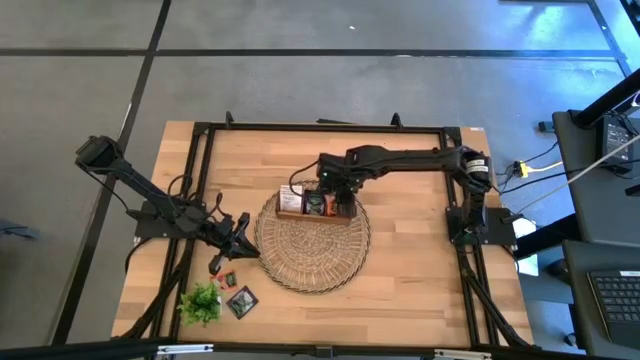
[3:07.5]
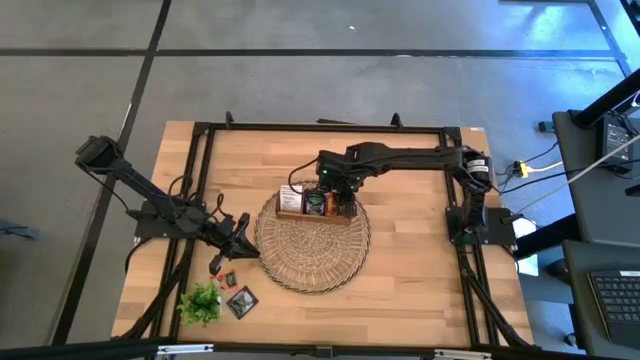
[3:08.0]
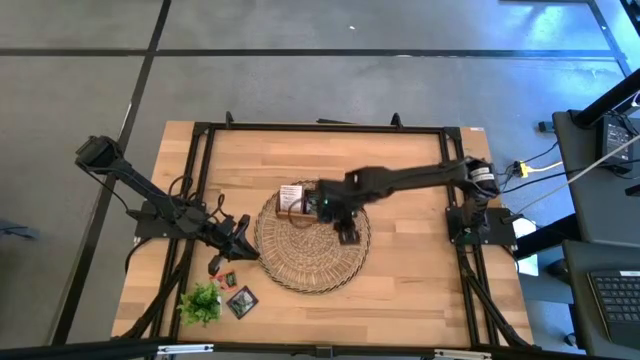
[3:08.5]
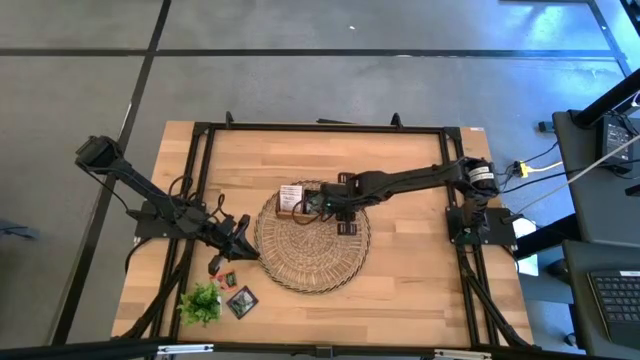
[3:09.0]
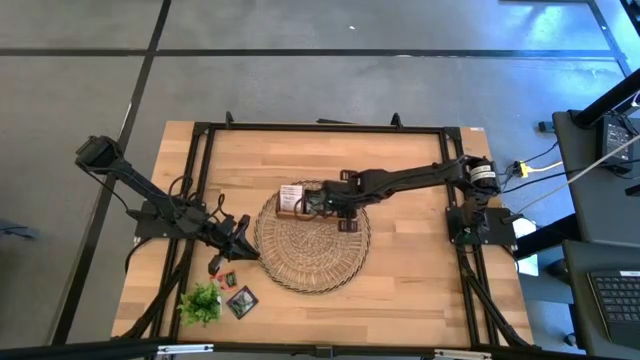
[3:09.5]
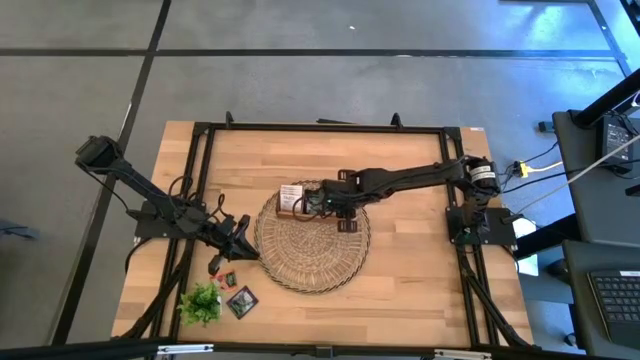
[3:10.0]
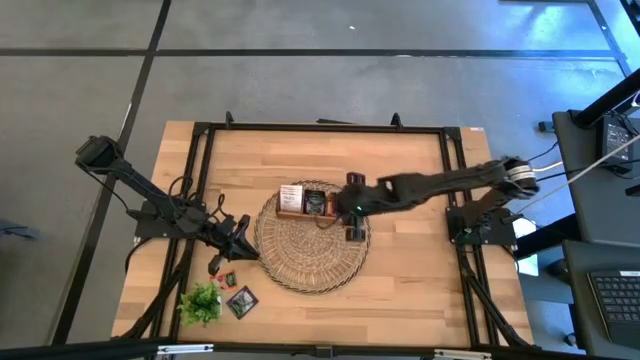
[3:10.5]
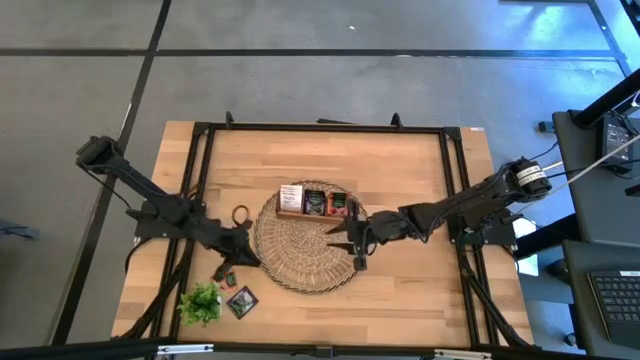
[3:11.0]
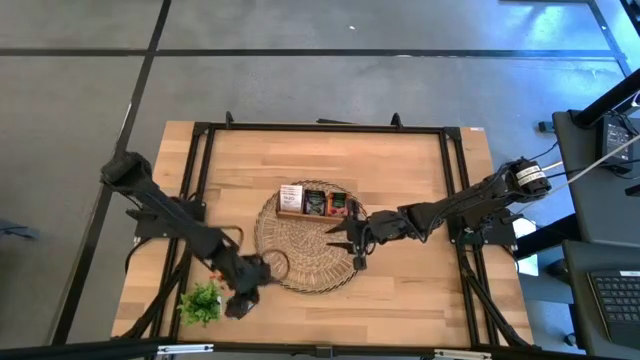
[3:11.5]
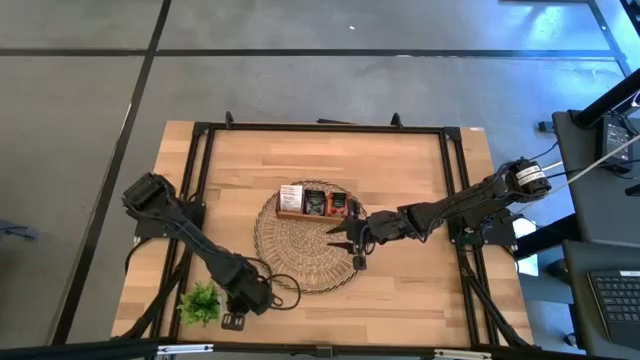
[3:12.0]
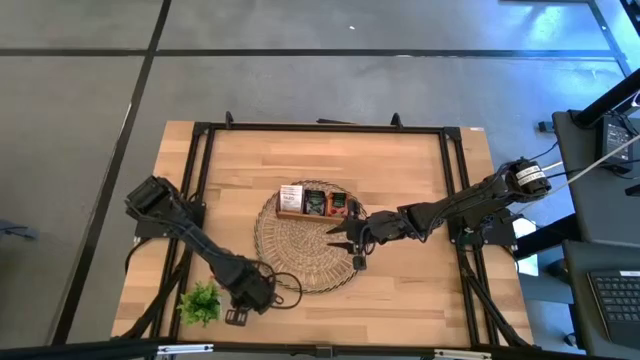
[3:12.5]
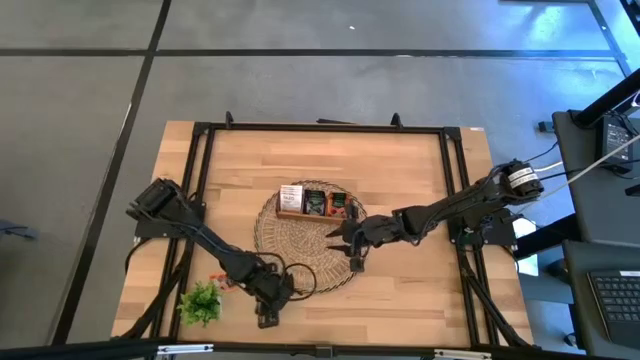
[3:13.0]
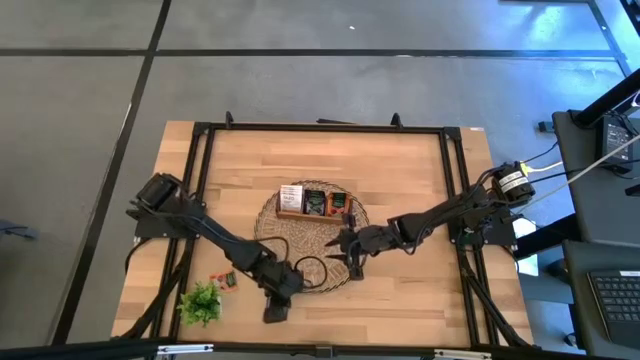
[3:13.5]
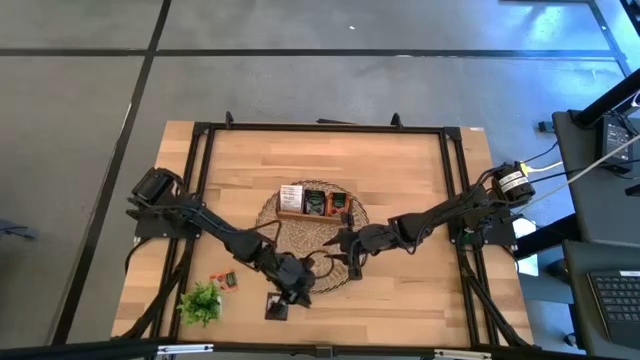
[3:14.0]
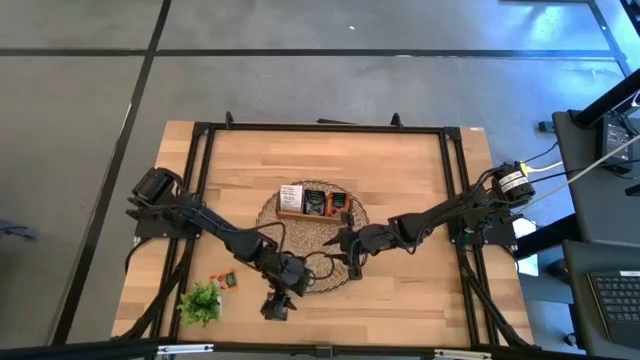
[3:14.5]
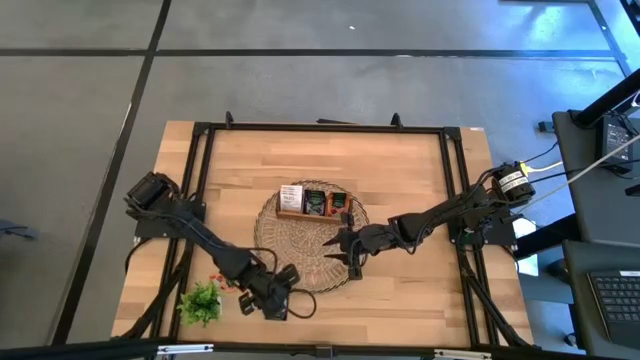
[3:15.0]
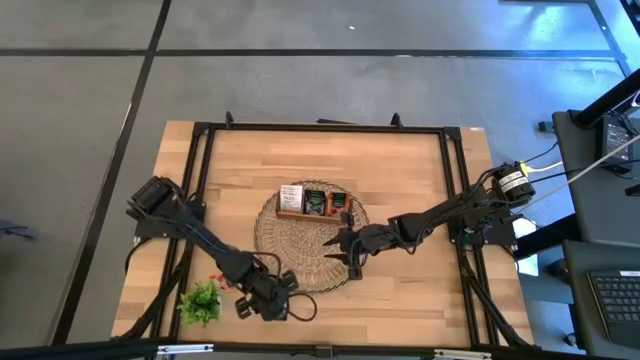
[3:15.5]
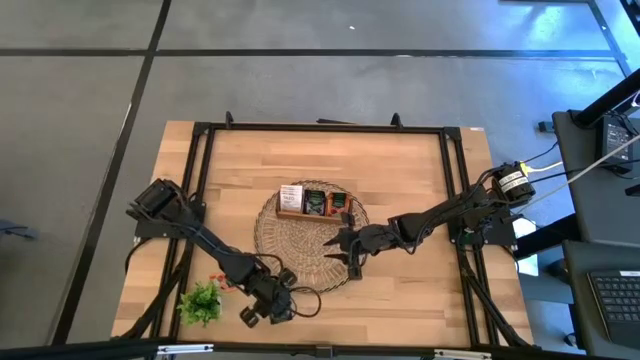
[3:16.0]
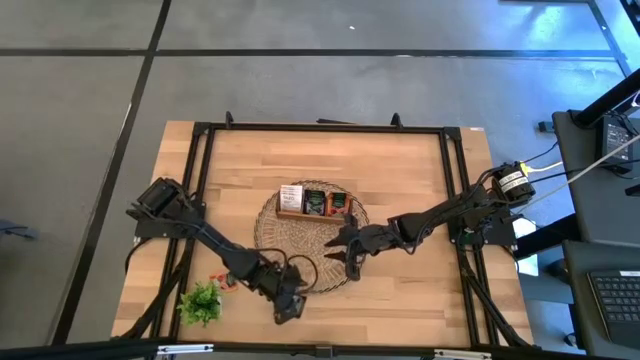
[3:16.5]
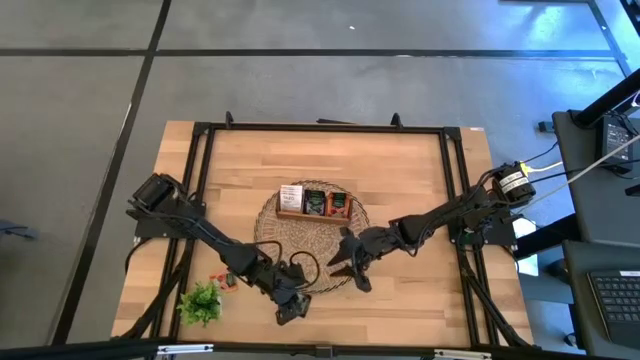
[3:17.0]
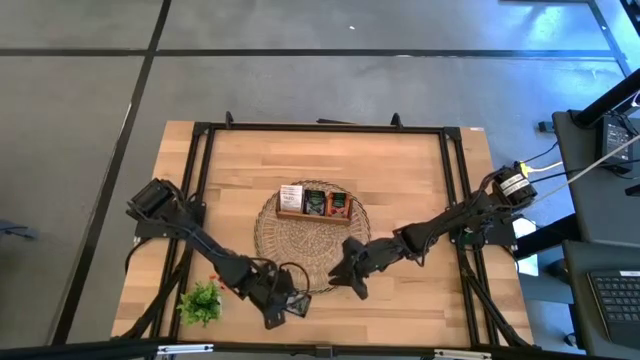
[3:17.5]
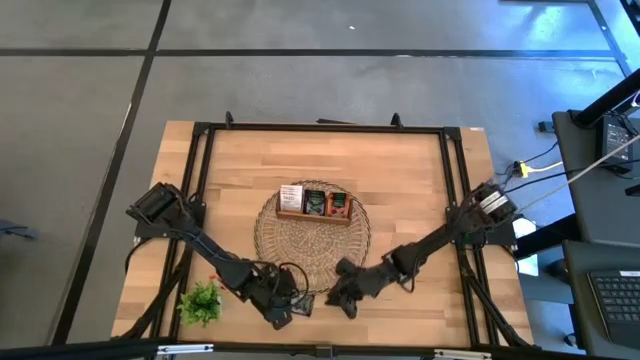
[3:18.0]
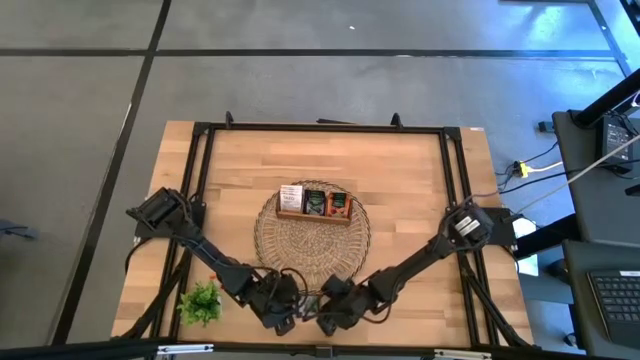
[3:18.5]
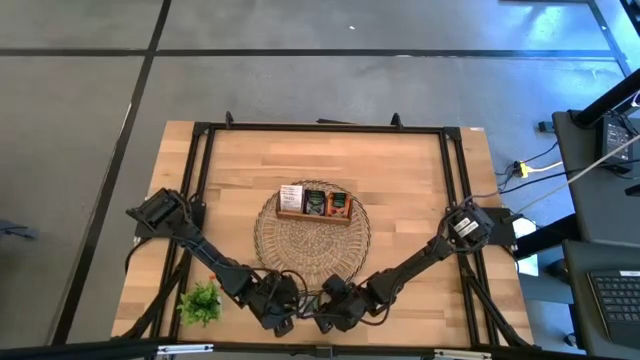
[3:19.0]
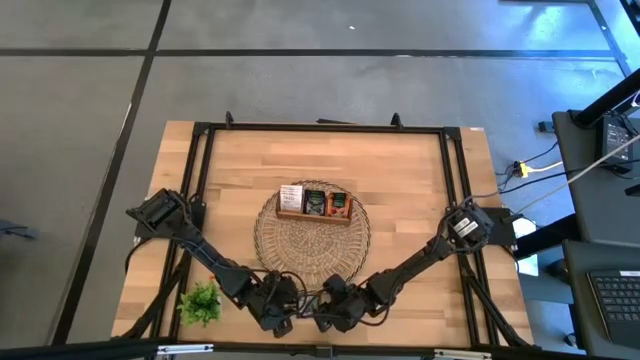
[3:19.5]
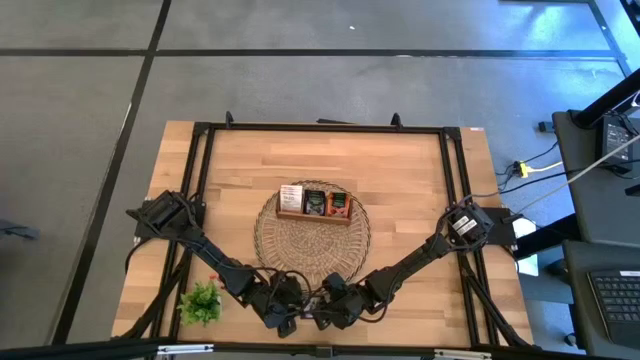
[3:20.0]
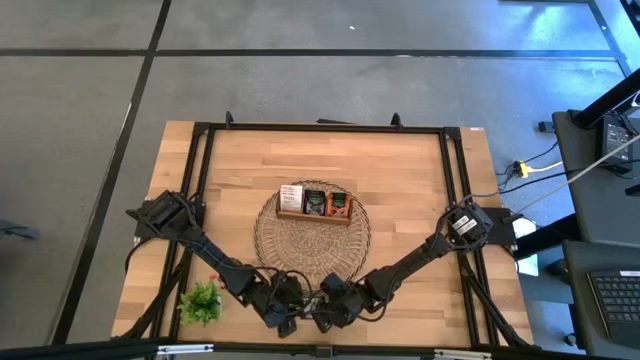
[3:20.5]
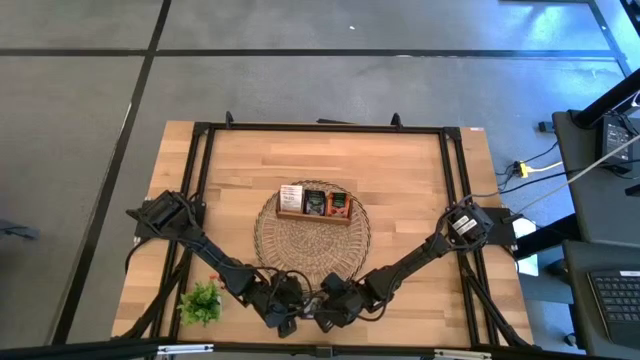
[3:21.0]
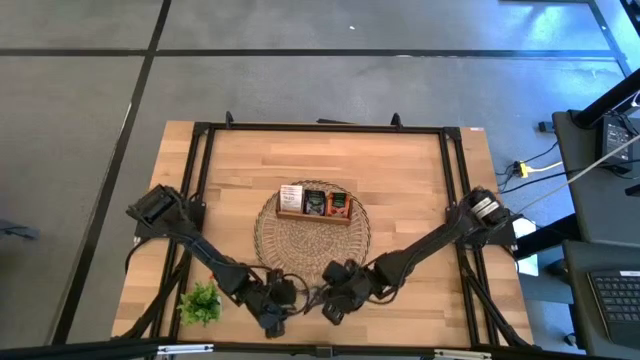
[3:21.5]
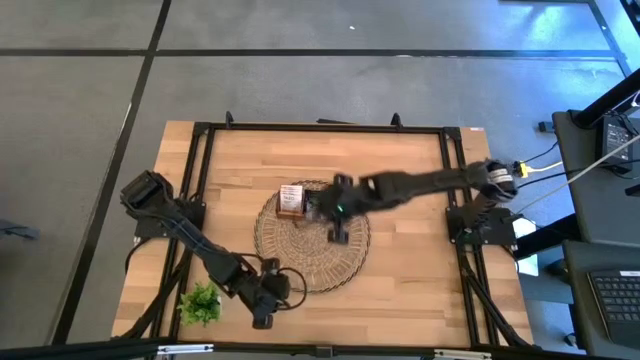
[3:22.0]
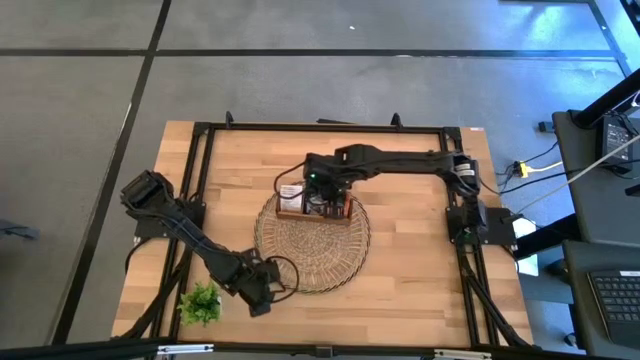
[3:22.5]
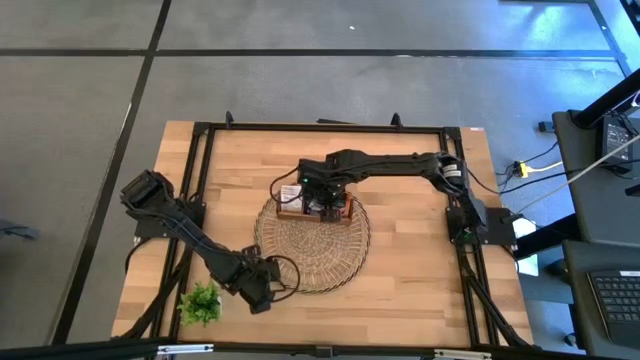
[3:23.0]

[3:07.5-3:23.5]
Task: Pick & Place Tea
Put the violet tea bag into the middle slot of the wooden organizer

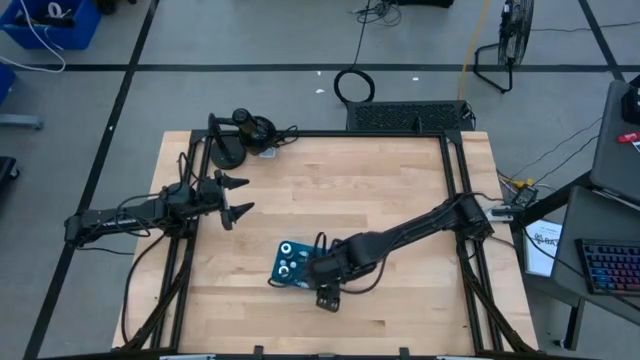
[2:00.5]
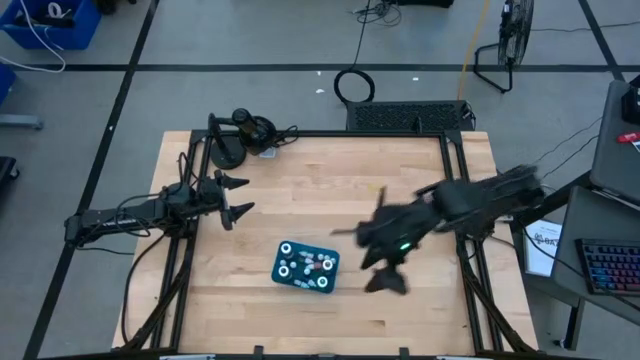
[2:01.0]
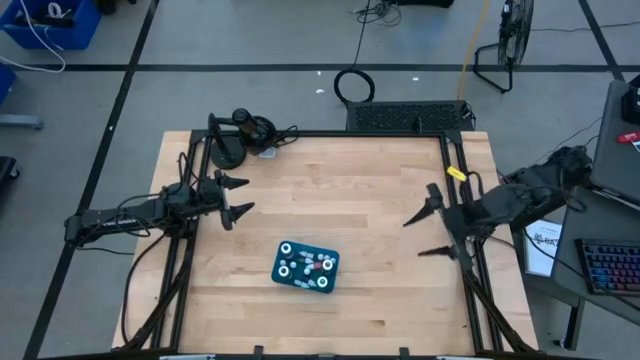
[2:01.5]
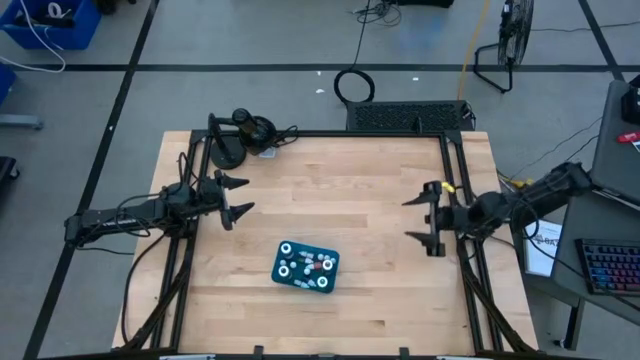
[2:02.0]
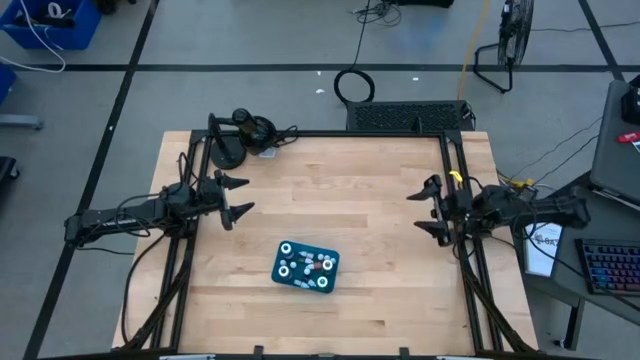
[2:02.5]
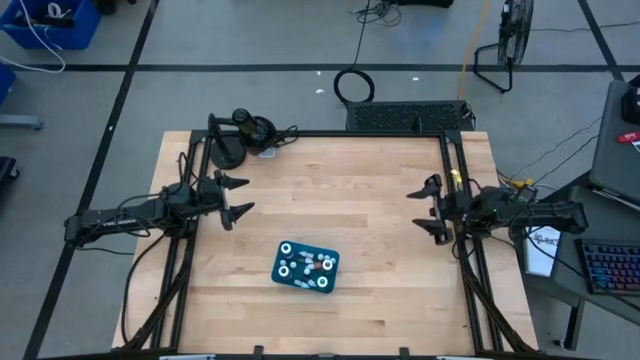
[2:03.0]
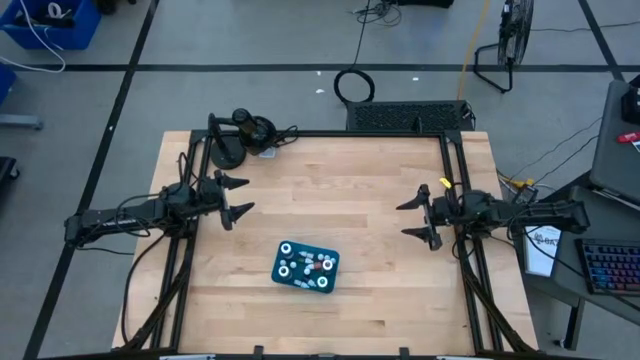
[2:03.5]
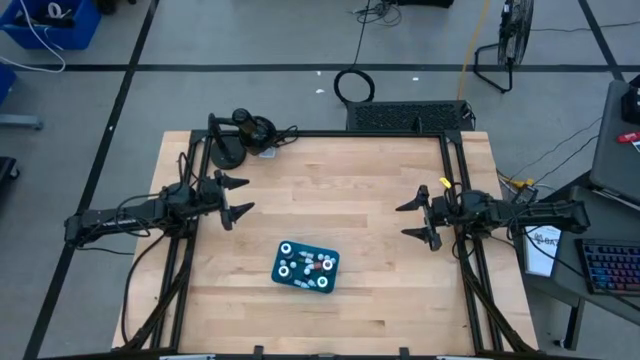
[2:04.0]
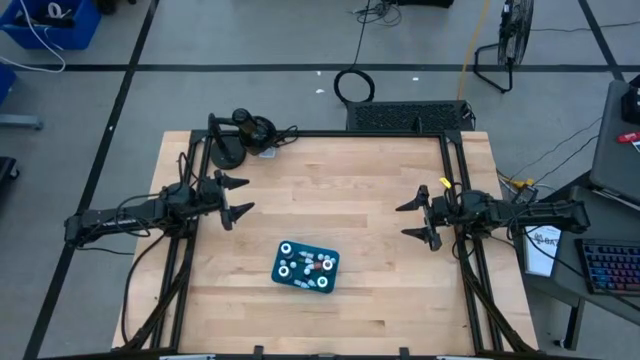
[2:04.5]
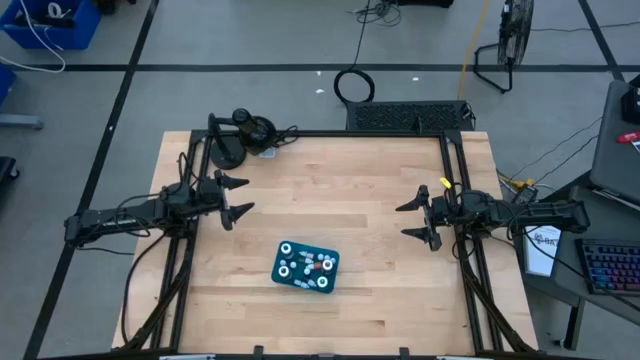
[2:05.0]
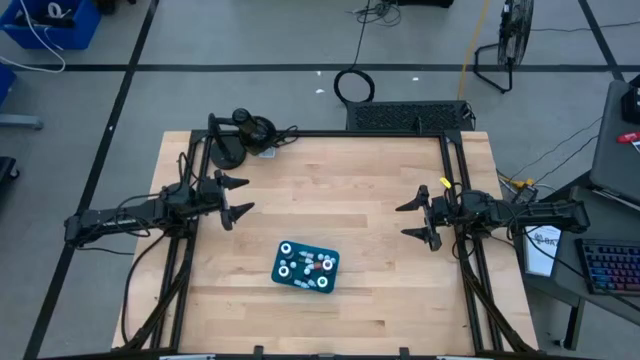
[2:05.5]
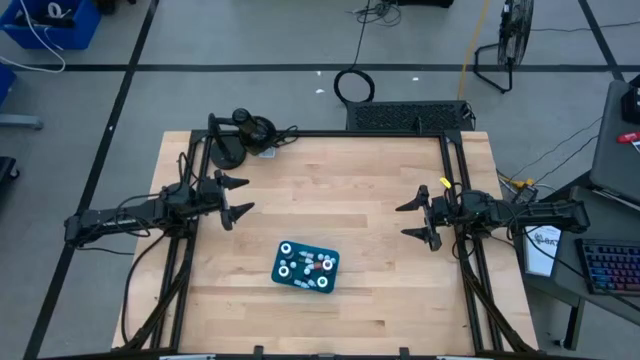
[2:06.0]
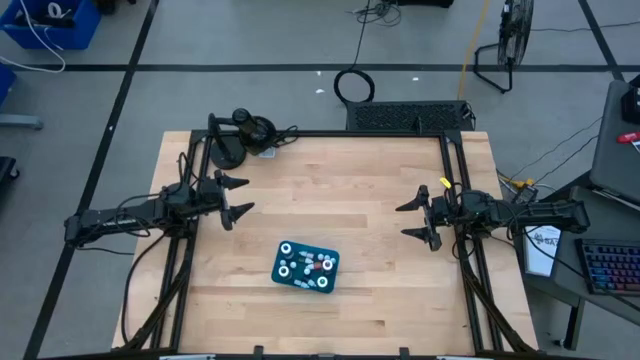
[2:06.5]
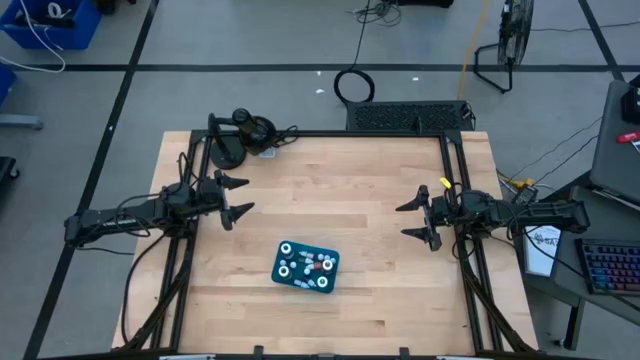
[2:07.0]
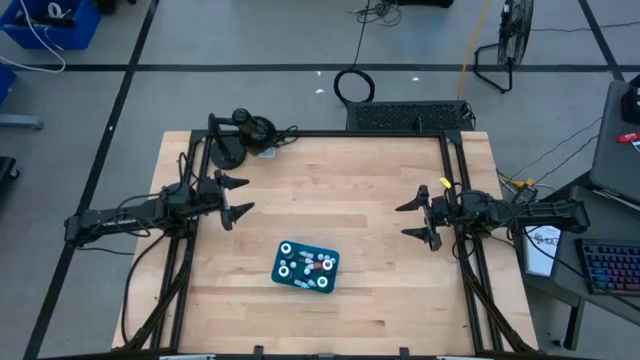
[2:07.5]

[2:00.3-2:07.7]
Task: Pick & Place food coloring
Return to Home Position
